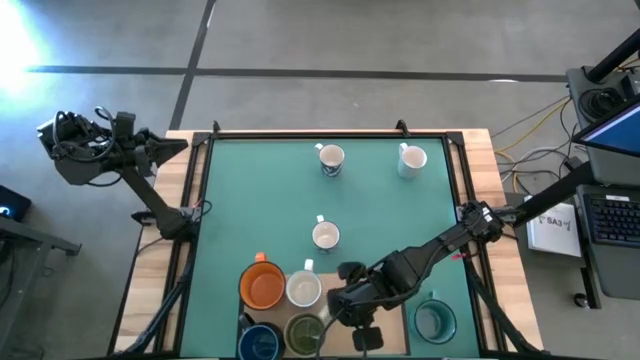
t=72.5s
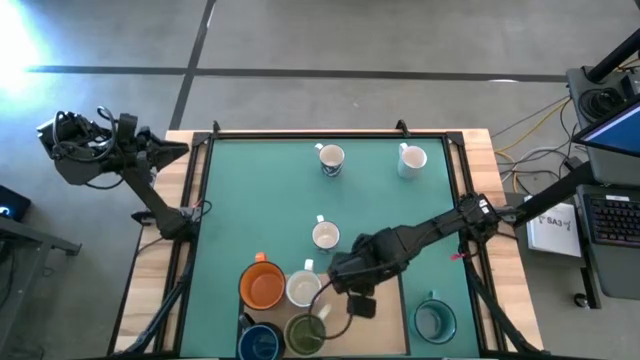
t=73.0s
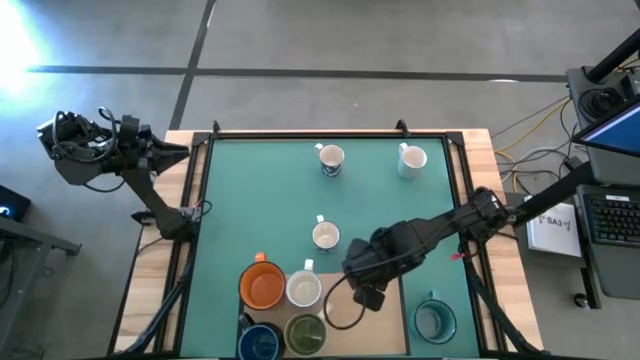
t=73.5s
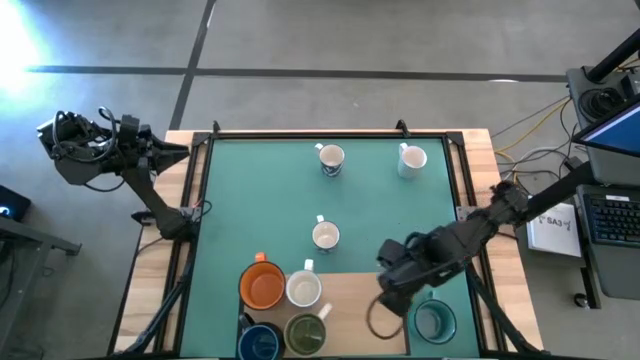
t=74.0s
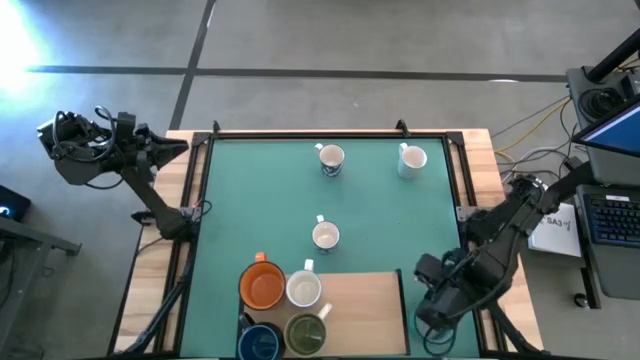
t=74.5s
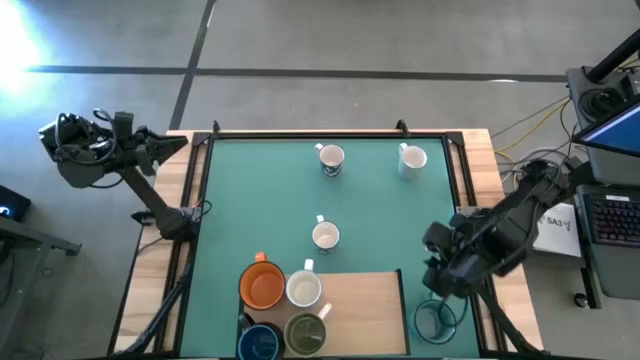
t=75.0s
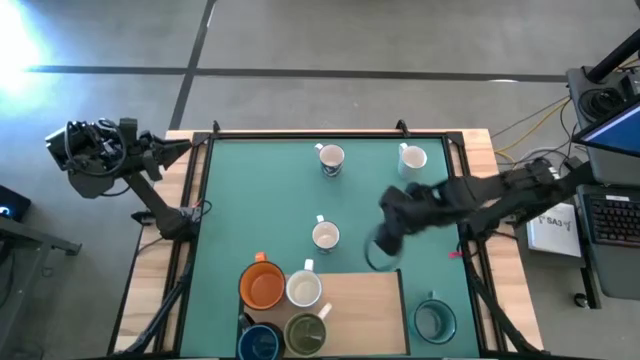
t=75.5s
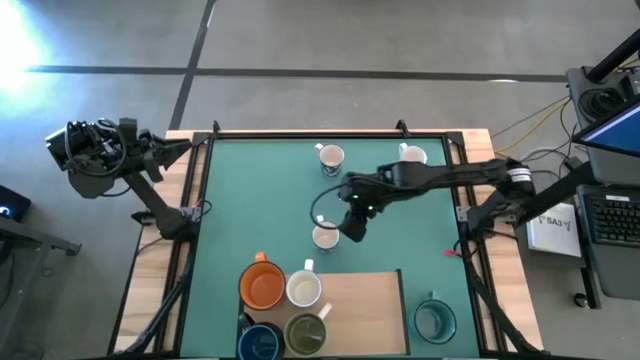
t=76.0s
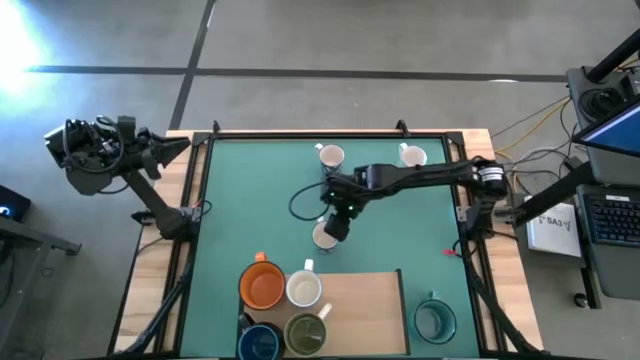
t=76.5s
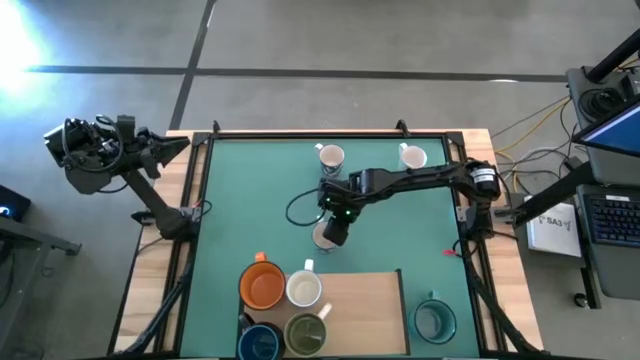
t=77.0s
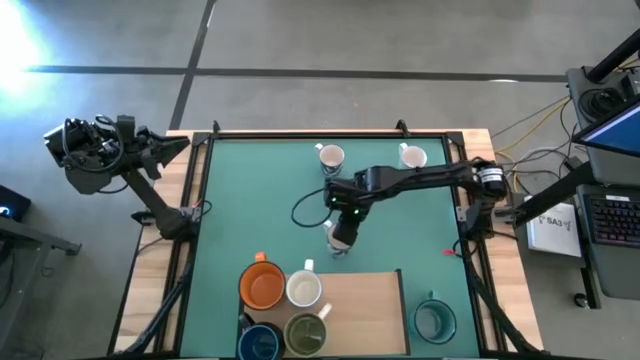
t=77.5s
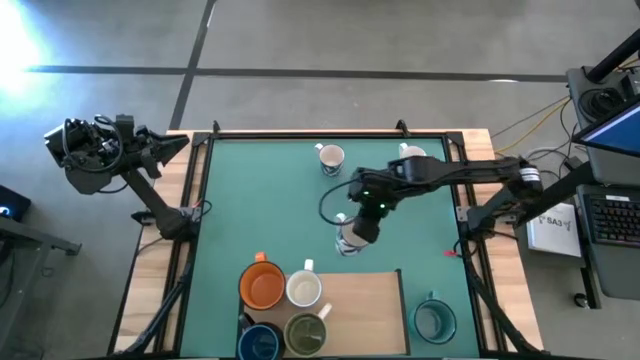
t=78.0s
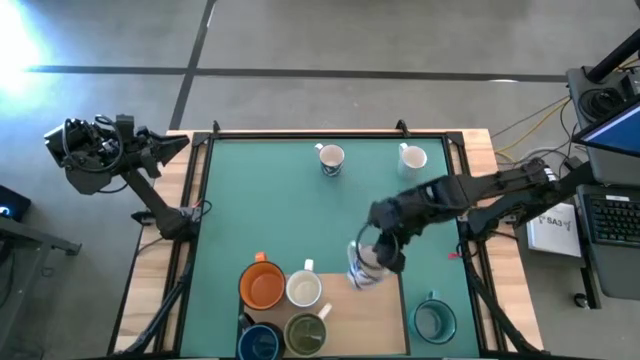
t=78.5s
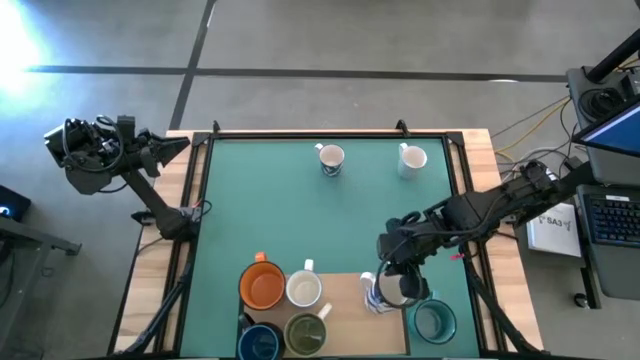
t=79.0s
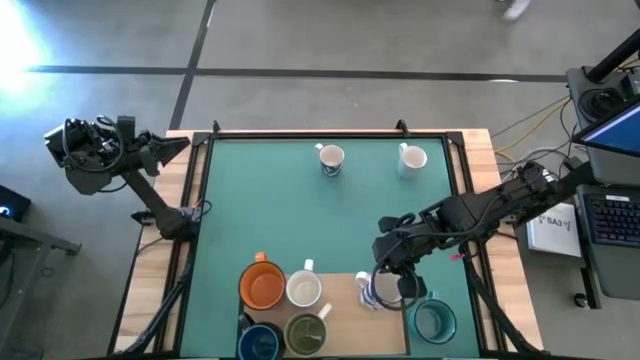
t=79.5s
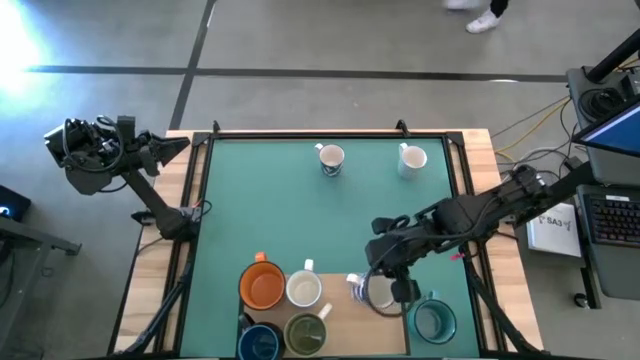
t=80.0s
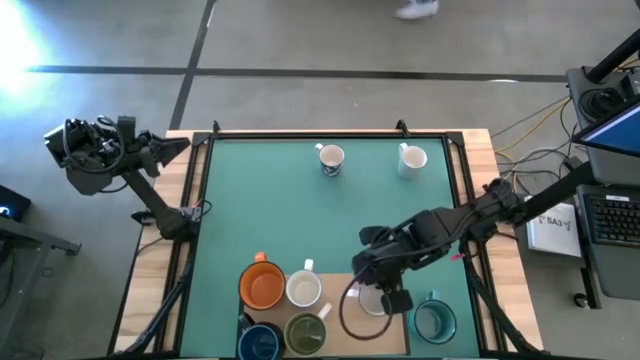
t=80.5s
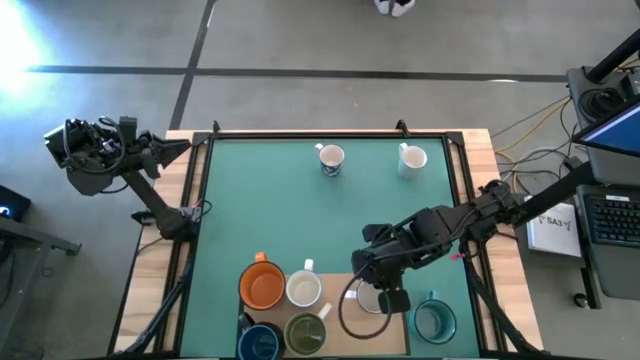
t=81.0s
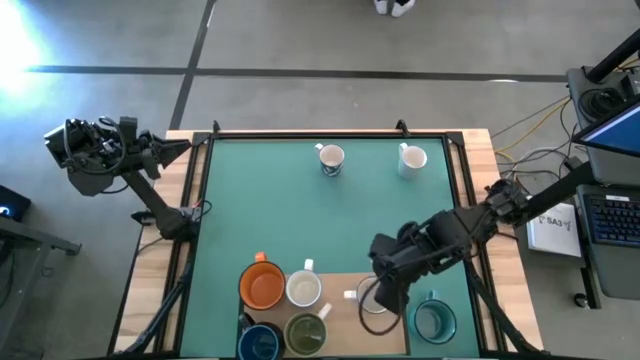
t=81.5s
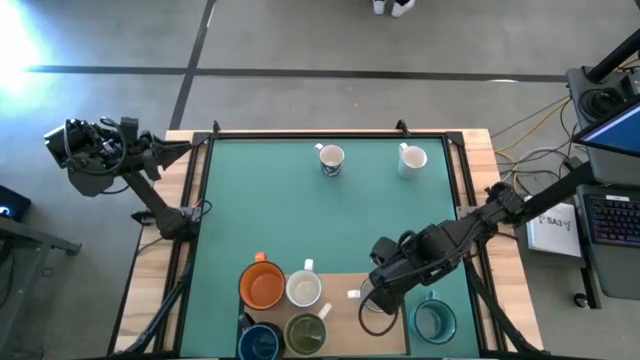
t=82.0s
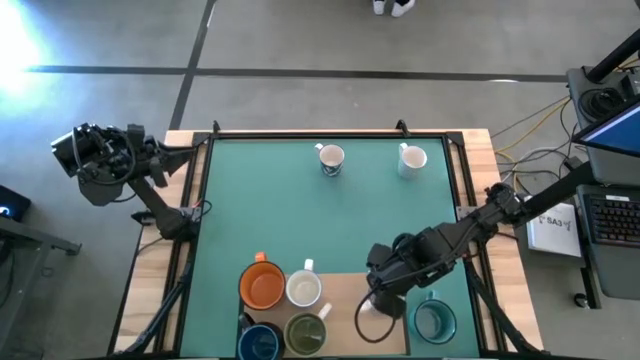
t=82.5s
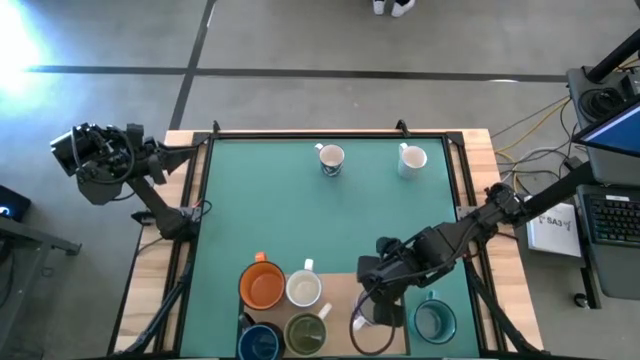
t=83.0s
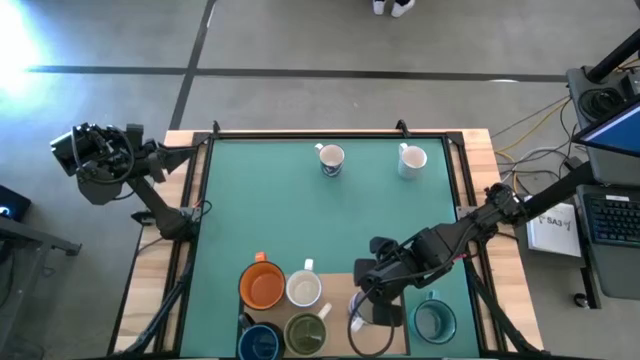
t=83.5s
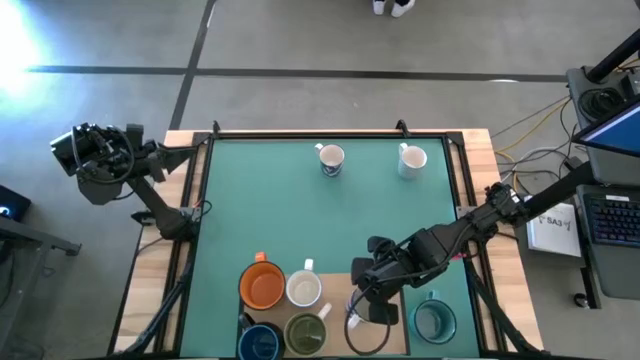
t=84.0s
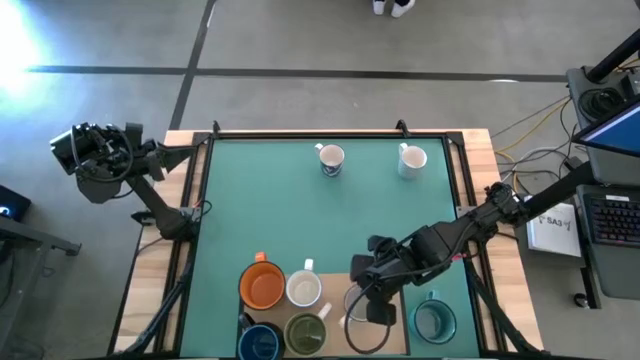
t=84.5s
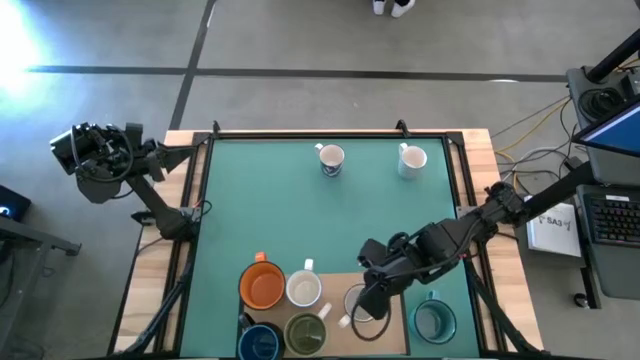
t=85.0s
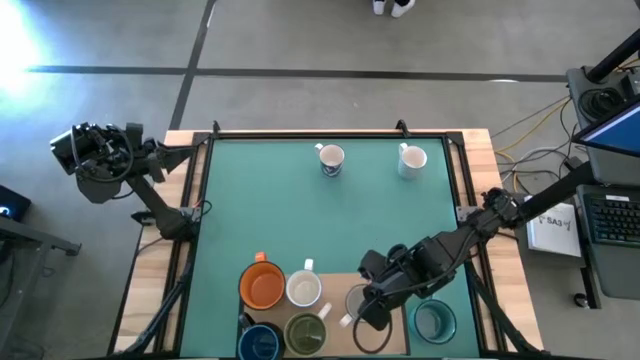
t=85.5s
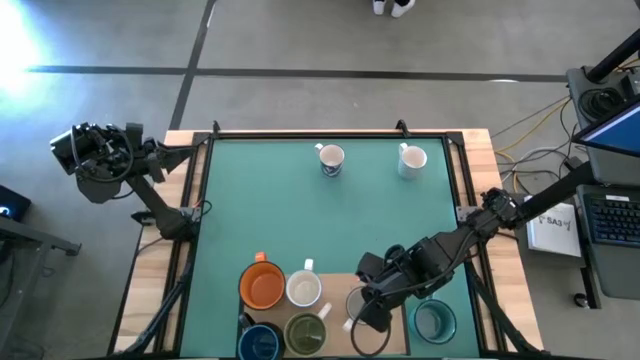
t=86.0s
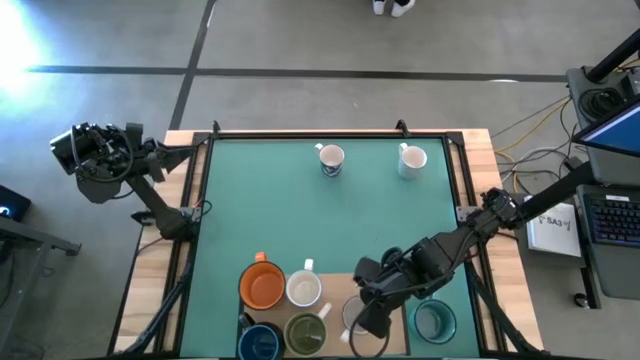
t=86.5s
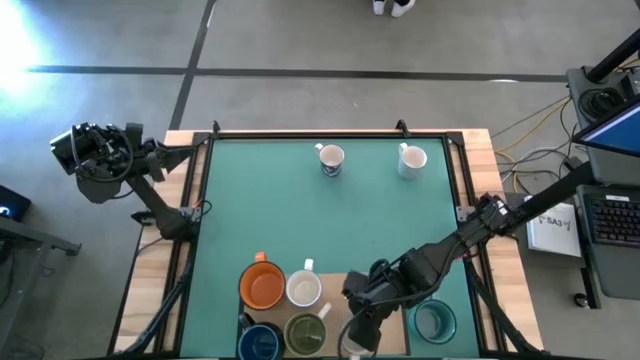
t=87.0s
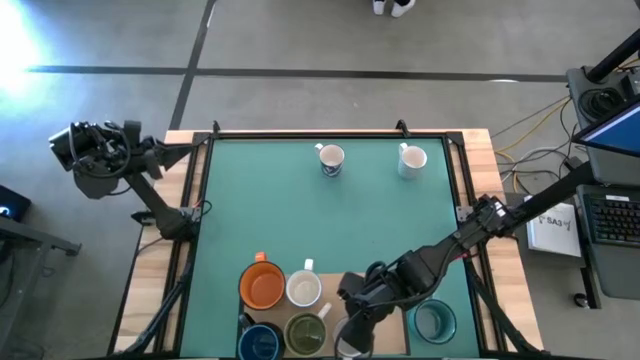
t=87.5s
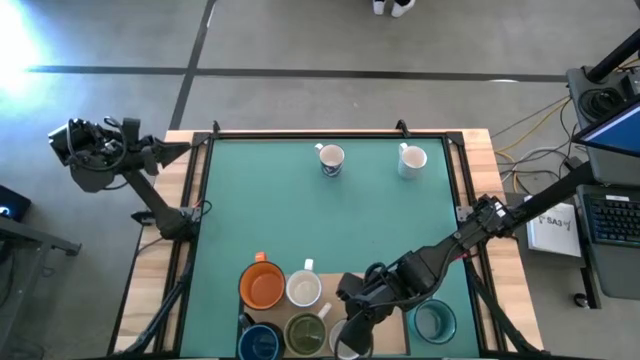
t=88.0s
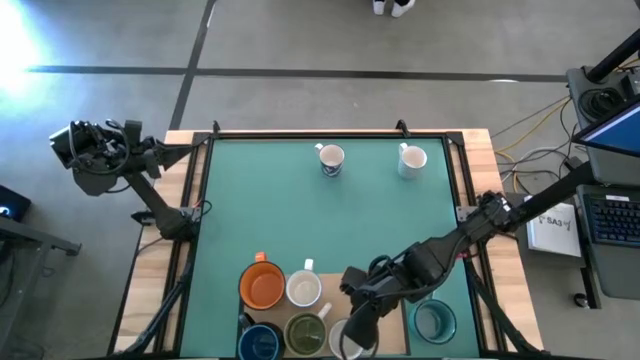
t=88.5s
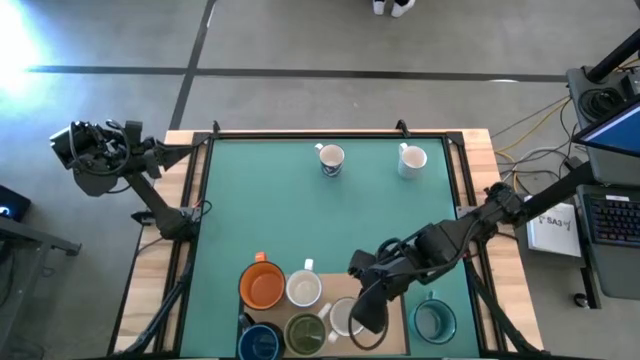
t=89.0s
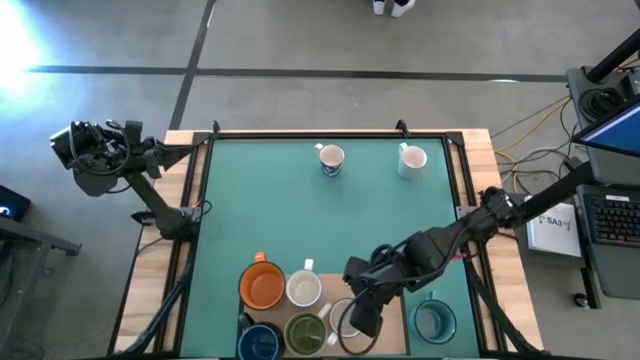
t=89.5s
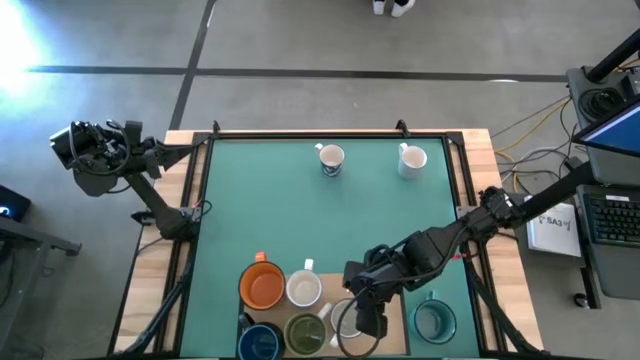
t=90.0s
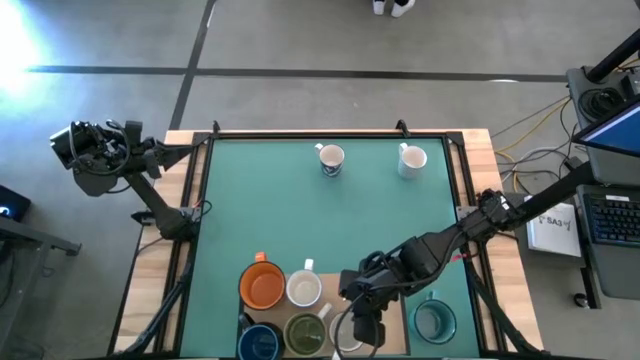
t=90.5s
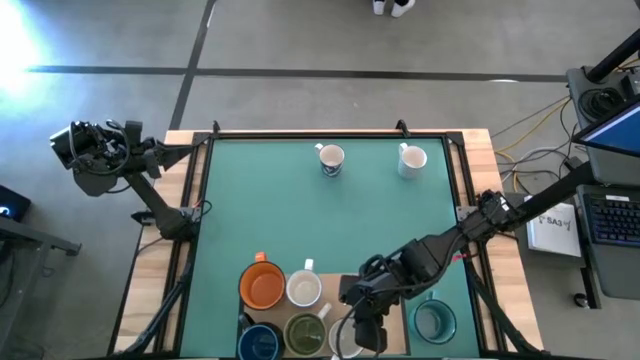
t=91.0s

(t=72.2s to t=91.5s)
Task: Place coffee mugs
Put the bottom blue patterned mug on the shelf

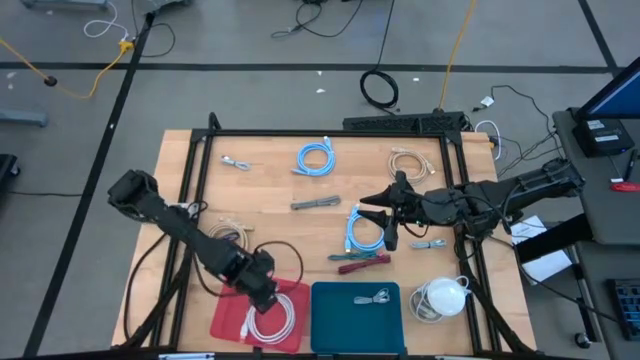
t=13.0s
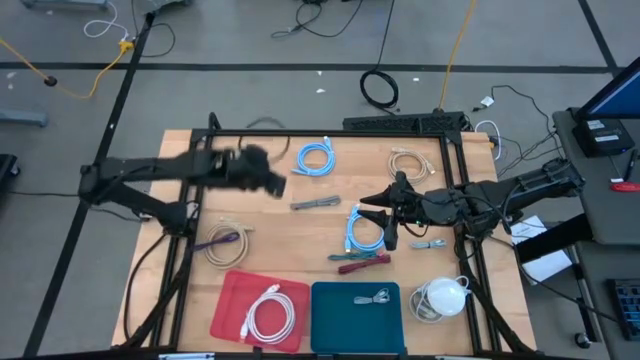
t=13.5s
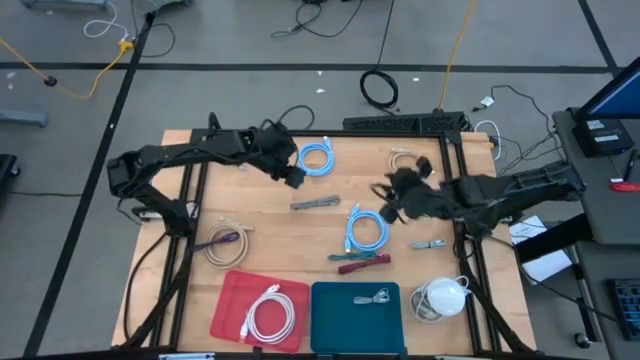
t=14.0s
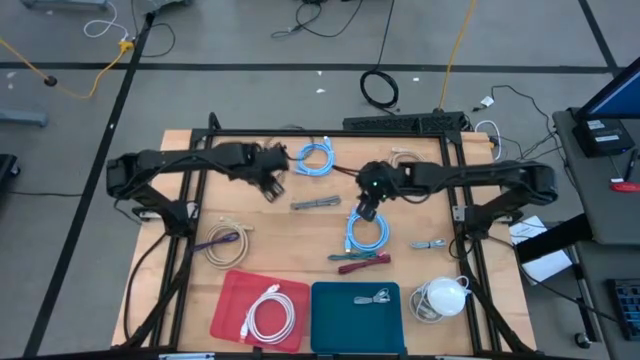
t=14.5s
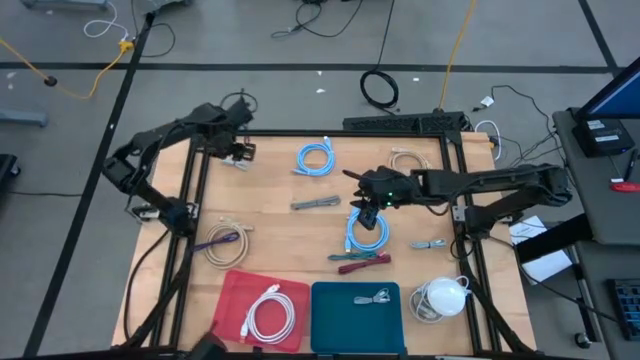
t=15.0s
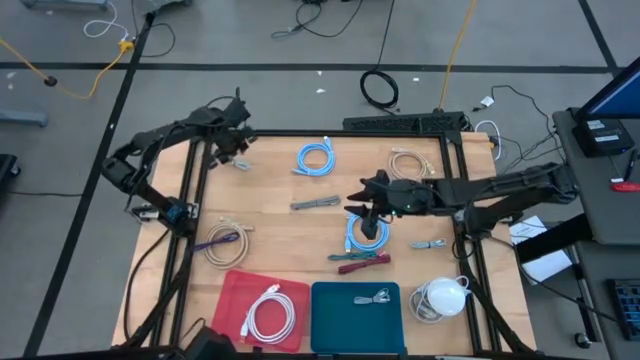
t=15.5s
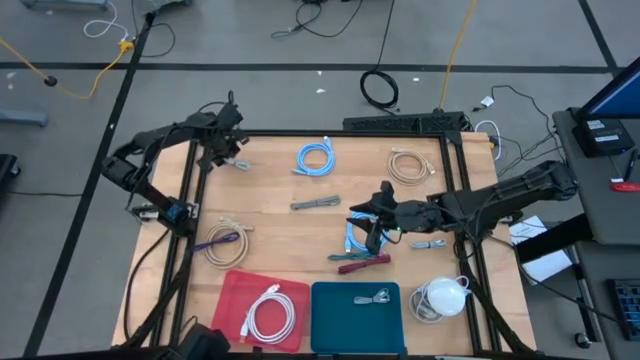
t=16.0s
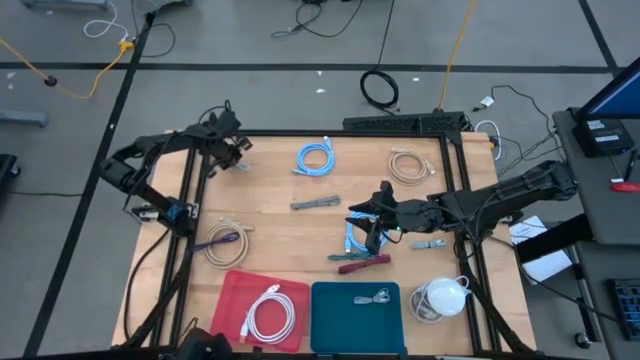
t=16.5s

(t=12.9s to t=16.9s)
Task: Pick & Place USB Port
Put the top left white USB cable into the blue bin
